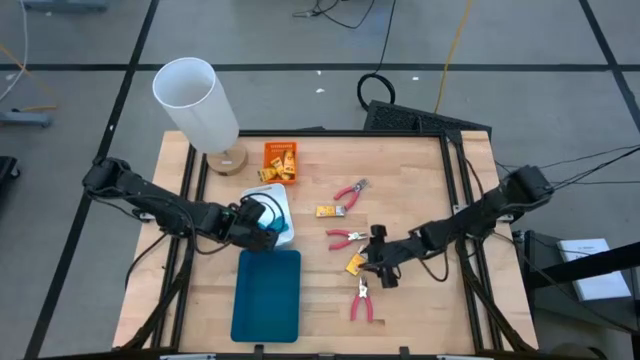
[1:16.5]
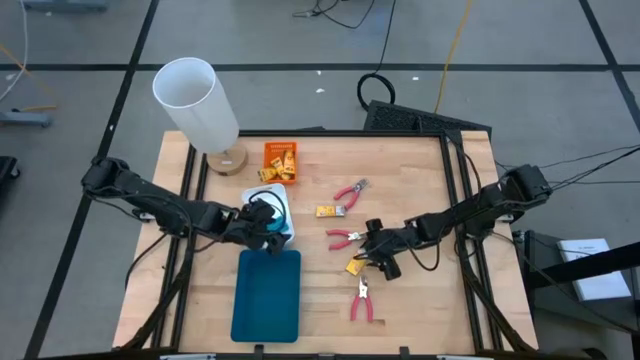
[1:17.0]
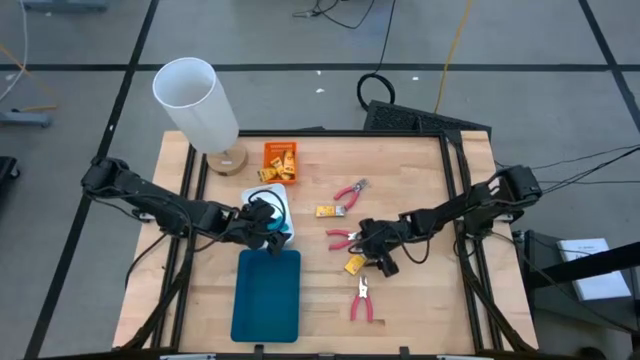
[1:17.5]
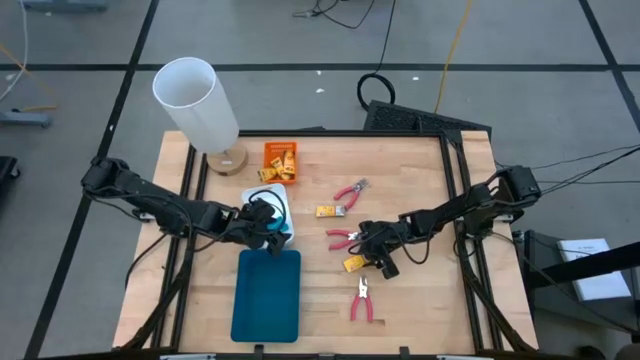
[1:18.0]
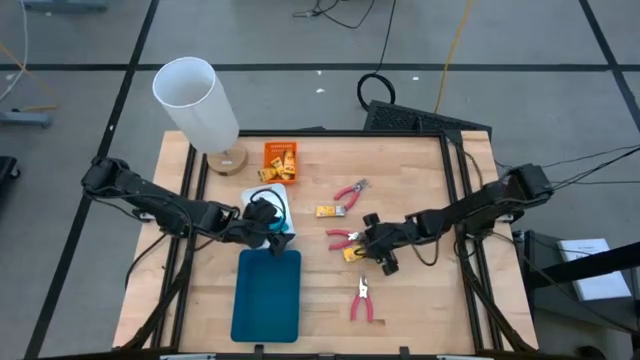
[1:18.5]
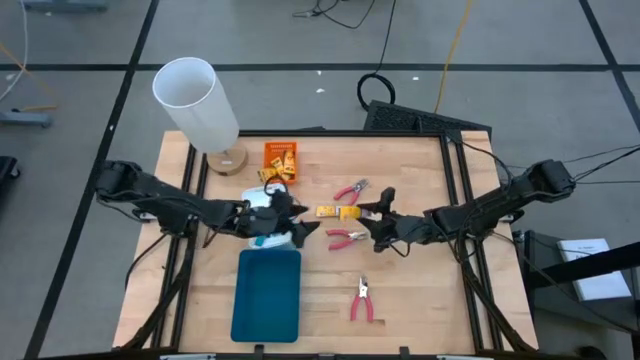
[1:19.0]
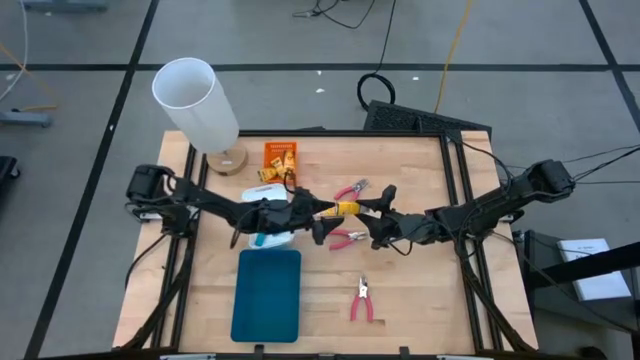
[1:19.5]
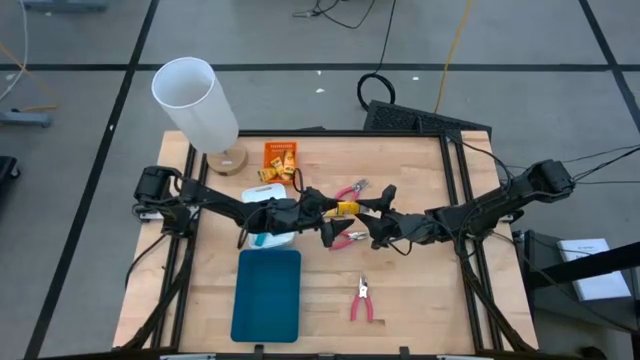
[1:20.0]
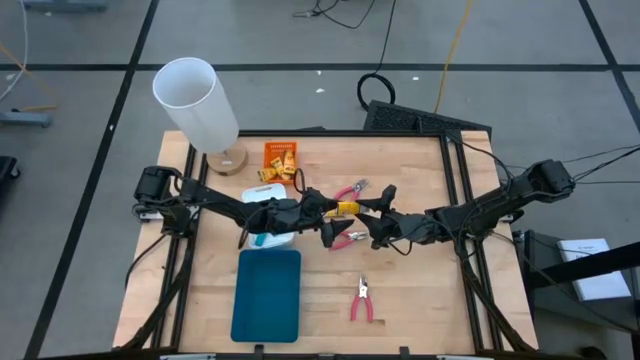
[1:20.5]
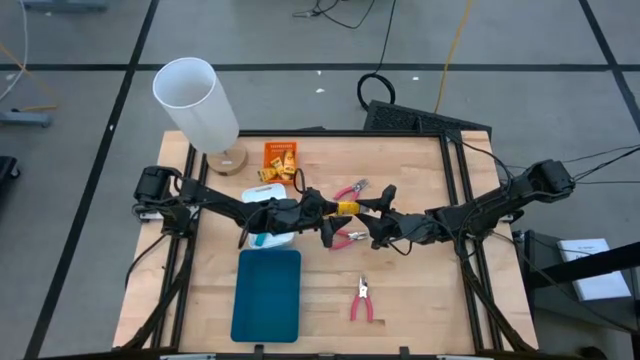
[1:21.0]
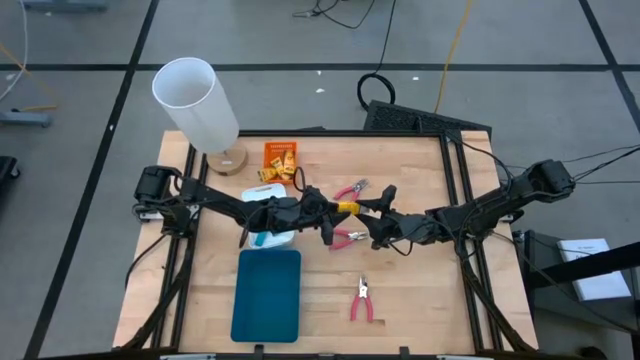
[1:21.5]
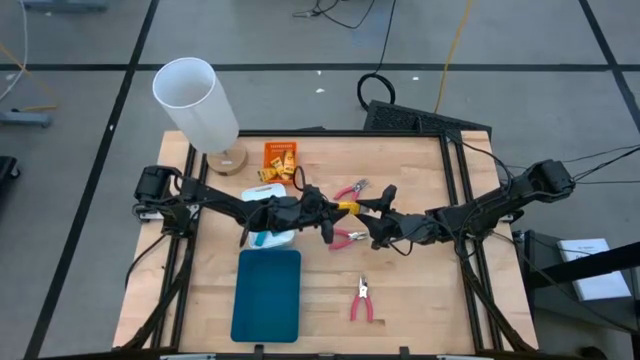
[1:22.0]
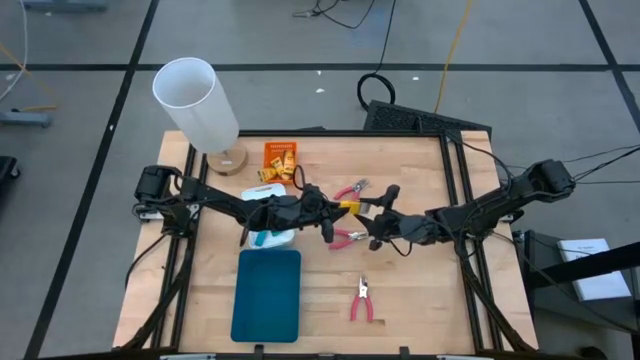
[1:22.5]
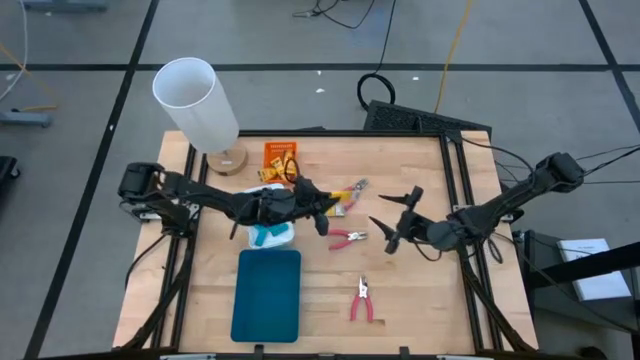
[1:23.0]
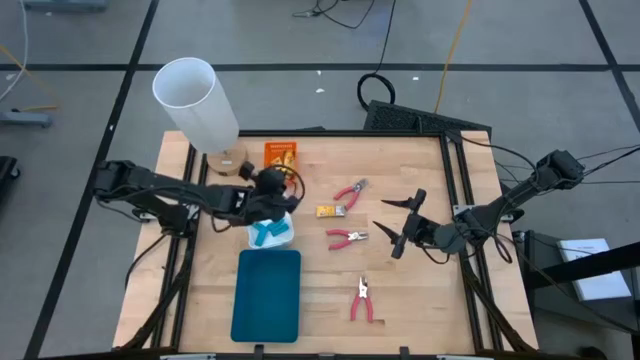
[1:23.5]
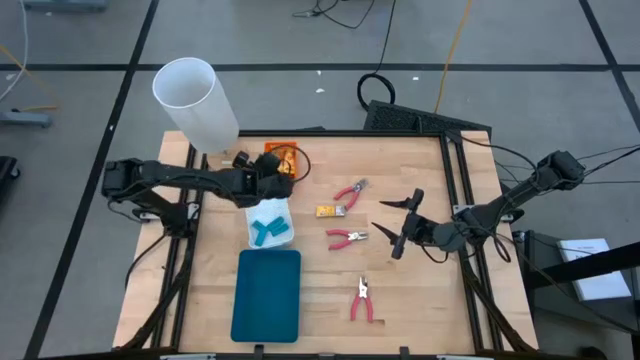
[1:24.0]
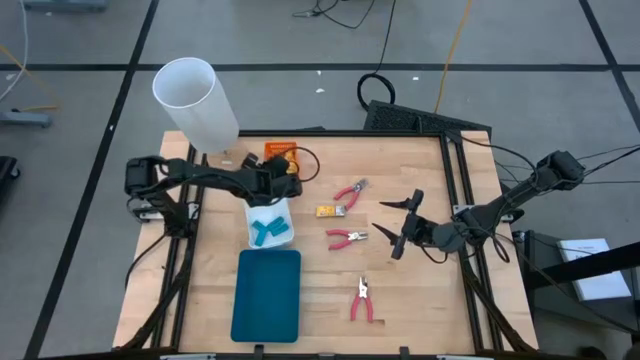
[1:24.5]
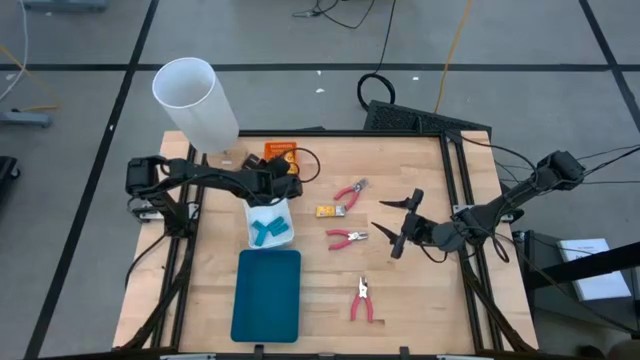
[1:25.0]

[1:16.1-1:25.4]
Task: Pick & Place School Supplies
Put the yellow crayon box into the orange bin

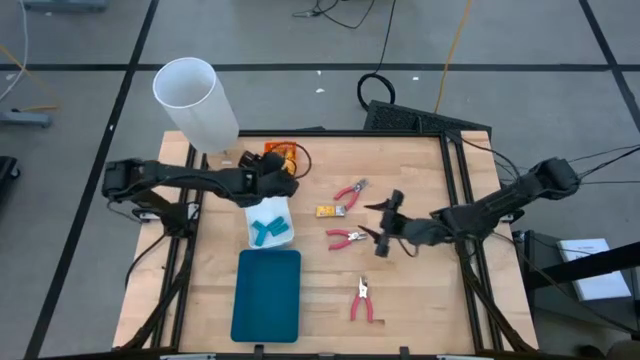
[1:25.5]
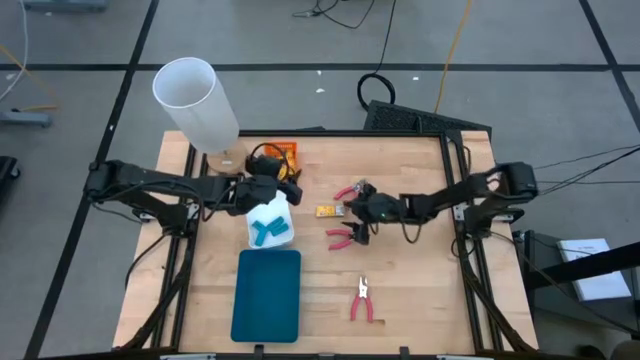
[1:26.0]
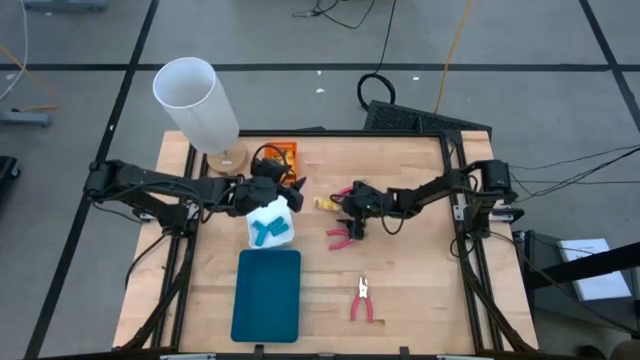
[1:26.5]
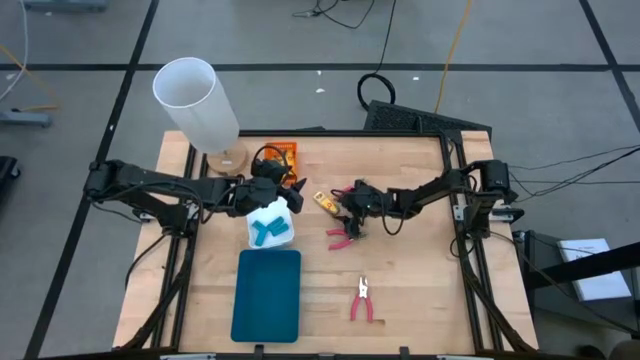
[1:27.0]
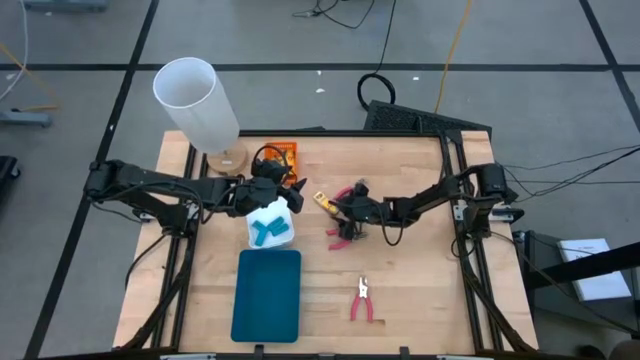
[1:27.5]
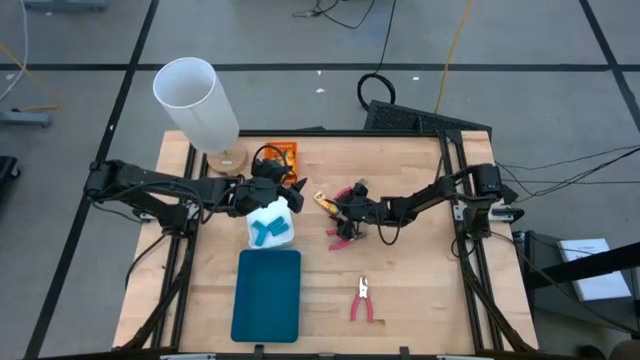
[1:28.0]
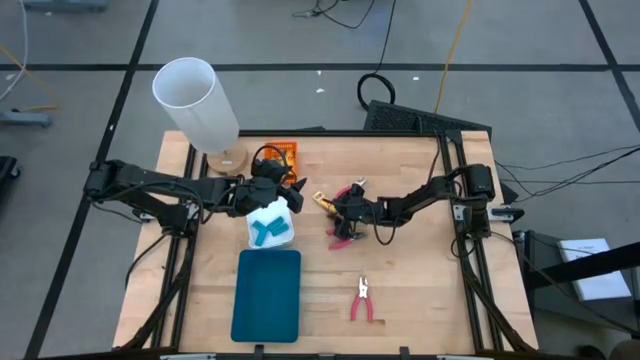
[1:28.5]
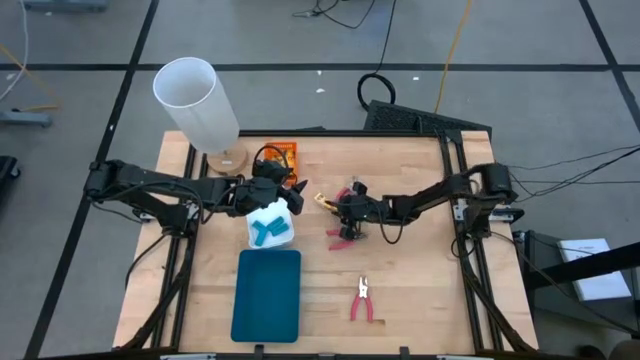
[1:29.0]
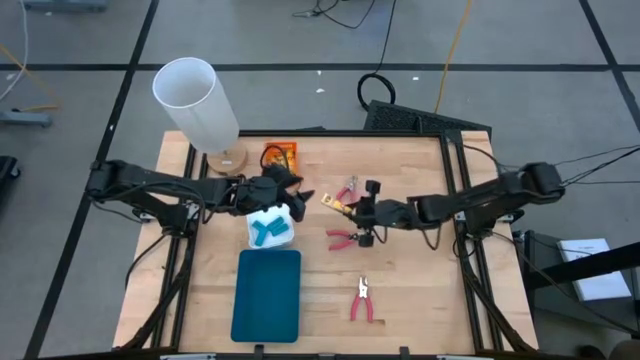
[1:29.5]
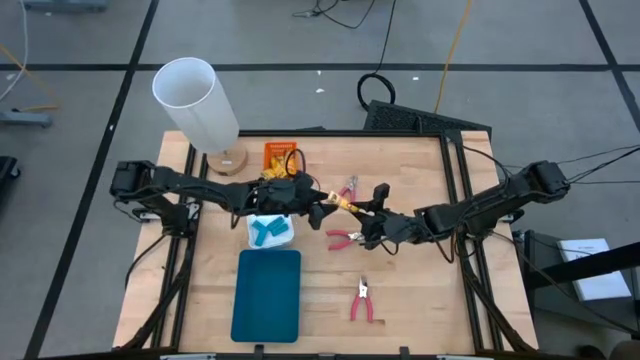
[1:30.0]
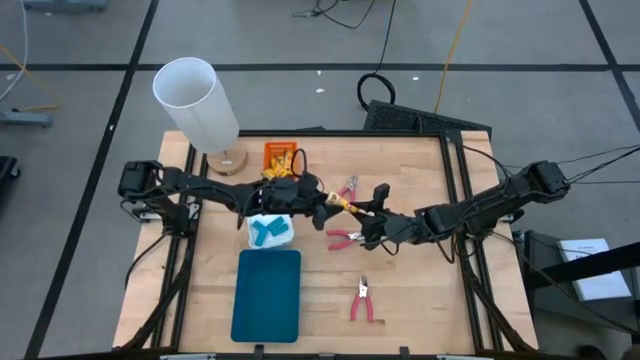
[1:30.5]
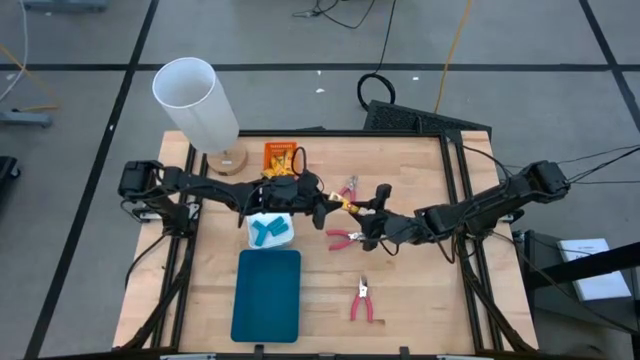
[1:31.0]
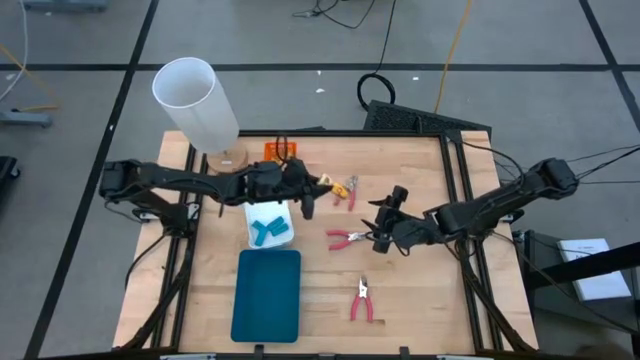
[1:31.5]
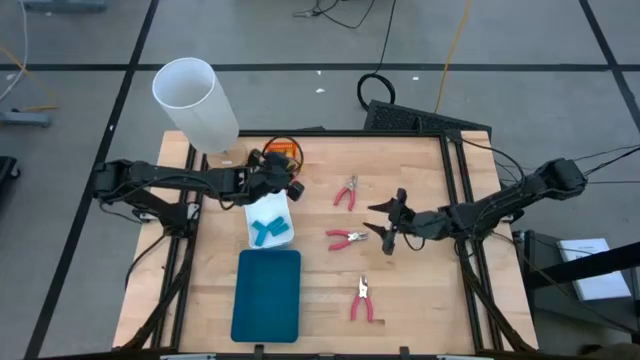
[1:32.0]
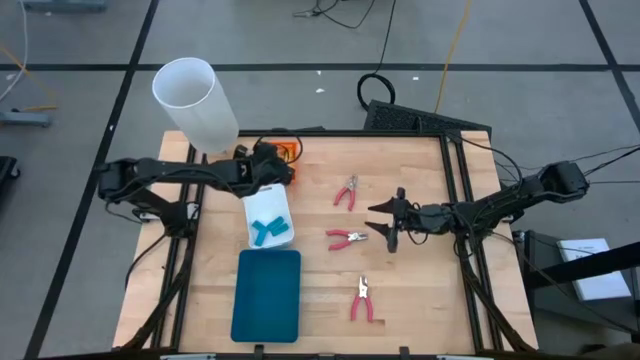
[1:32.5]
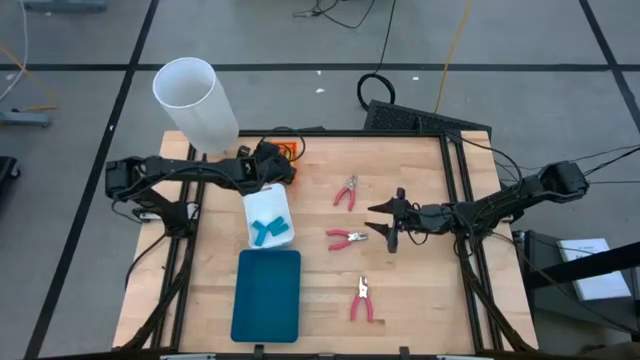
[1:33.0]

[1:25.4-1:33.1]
Put the yellow crayon box into the orange bin

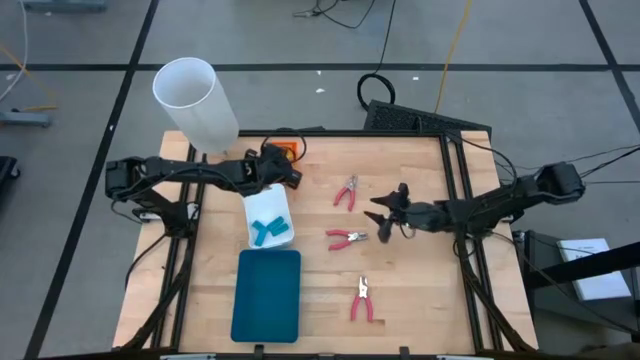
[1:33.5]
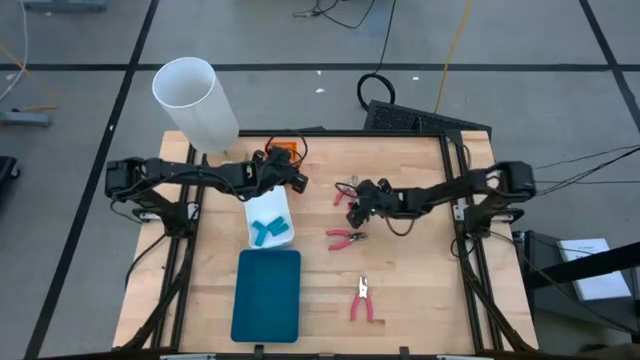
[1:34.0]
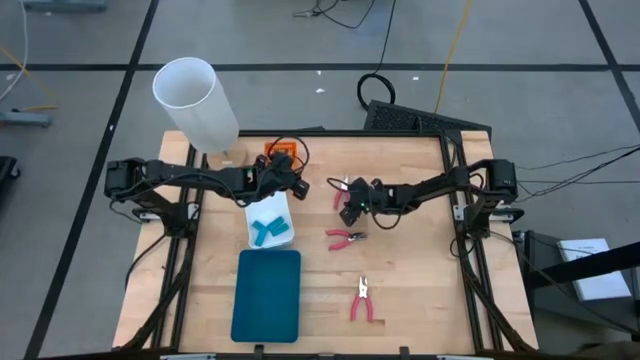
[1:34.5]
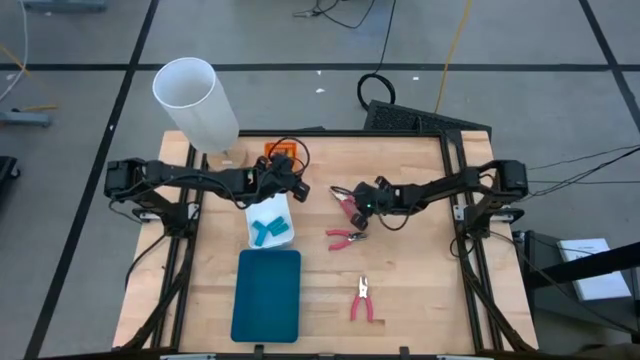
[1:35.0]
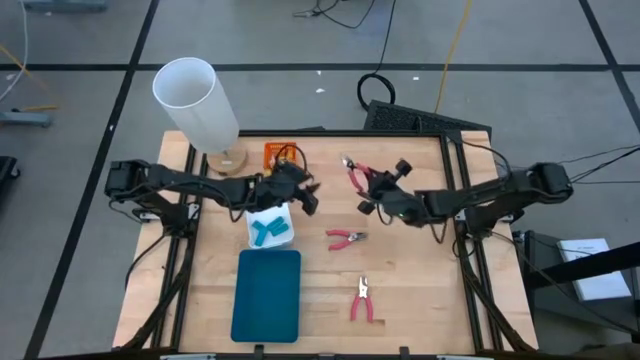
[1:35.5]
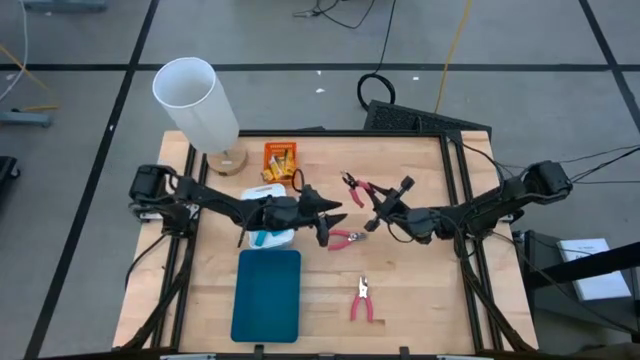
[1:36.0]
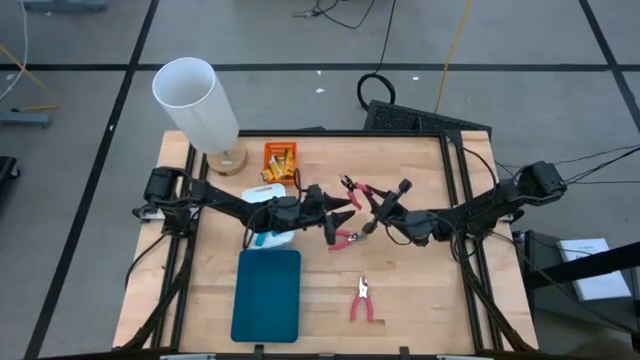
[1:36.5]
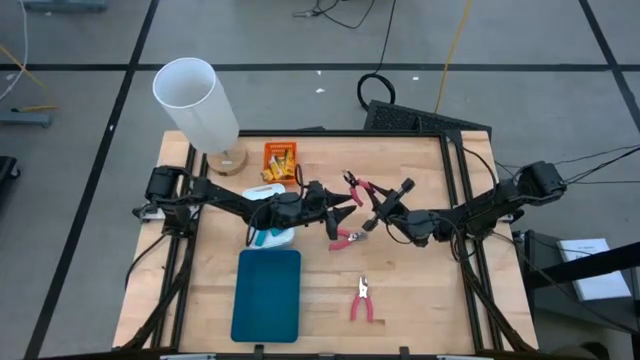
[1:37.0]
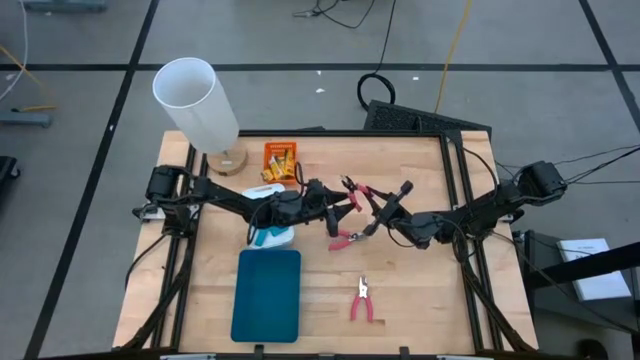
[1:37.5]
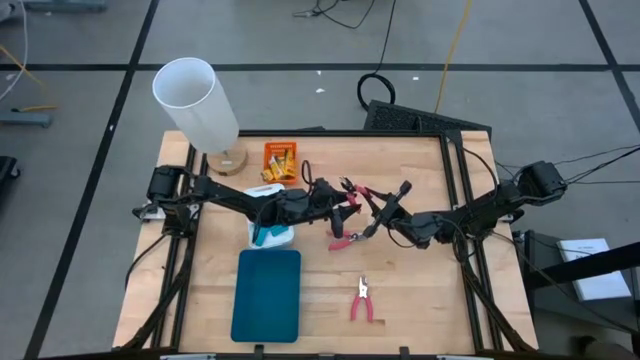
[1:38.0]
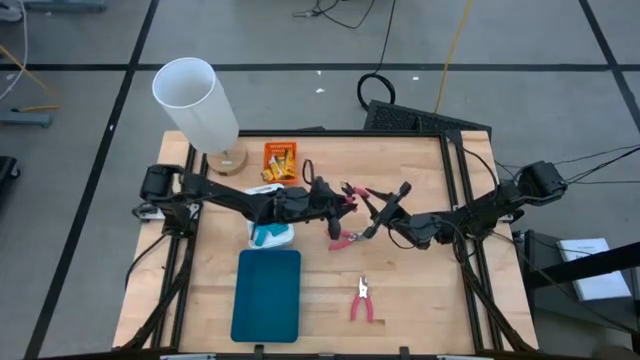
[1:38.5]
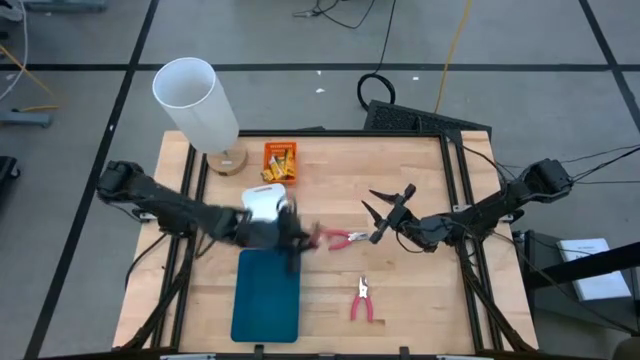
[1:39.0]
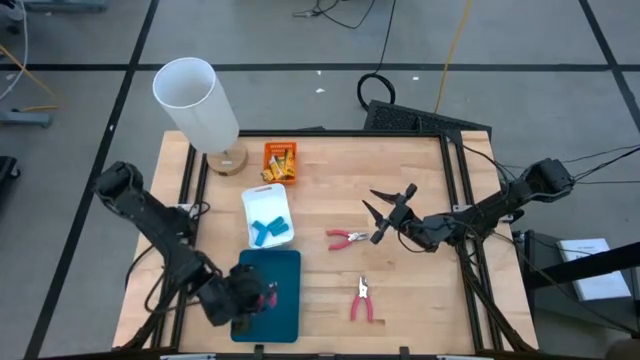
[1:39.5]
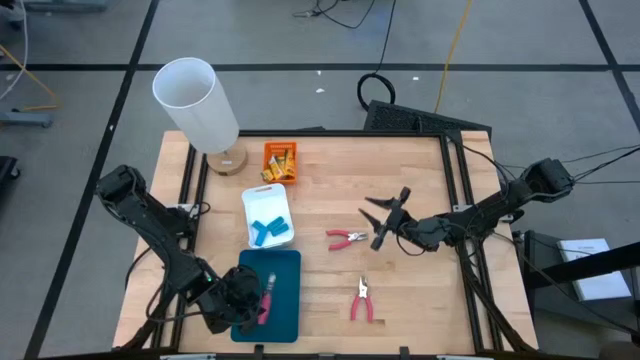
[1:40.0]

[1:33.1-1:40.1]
Put the pink hole puncher into the blue bin
